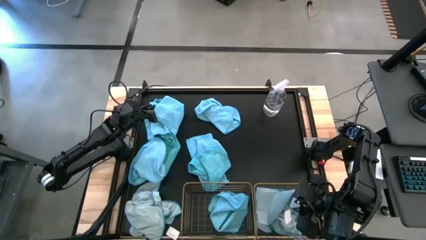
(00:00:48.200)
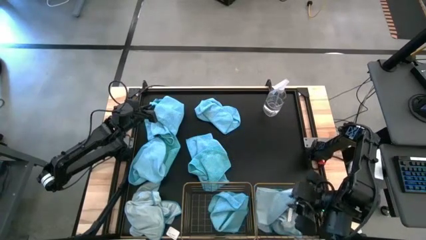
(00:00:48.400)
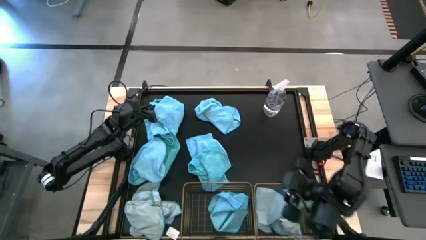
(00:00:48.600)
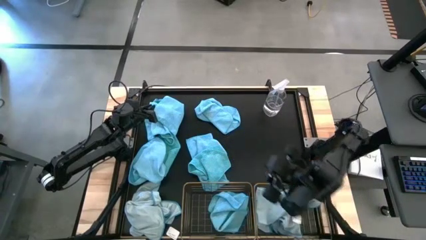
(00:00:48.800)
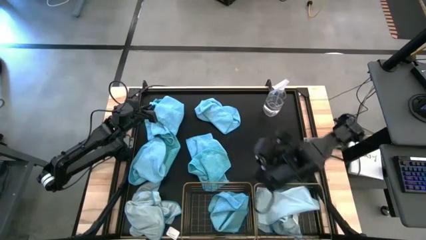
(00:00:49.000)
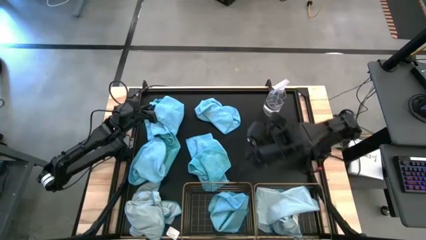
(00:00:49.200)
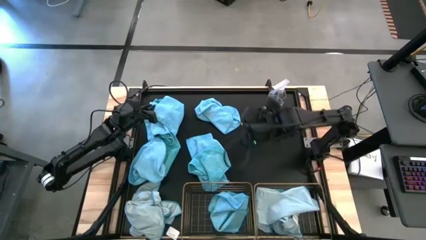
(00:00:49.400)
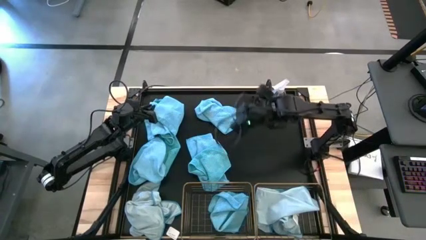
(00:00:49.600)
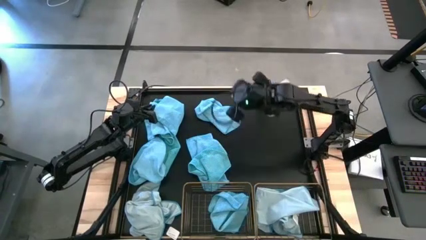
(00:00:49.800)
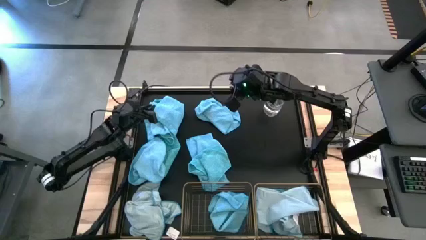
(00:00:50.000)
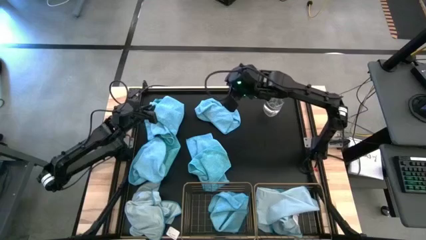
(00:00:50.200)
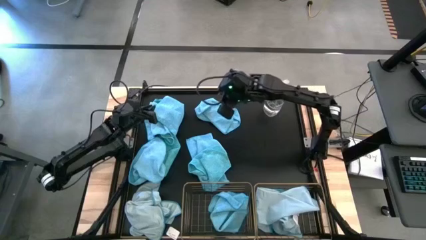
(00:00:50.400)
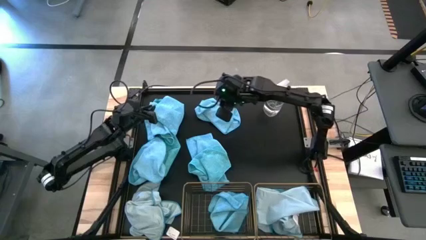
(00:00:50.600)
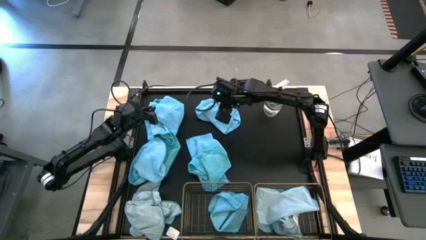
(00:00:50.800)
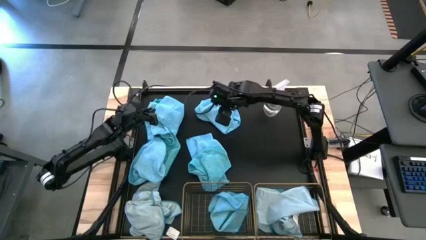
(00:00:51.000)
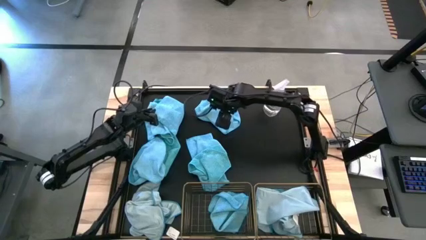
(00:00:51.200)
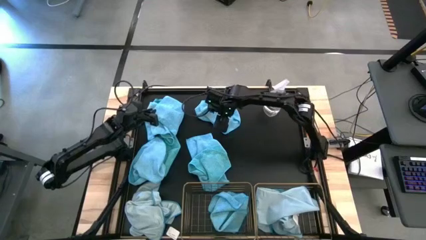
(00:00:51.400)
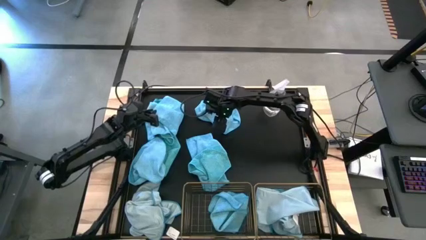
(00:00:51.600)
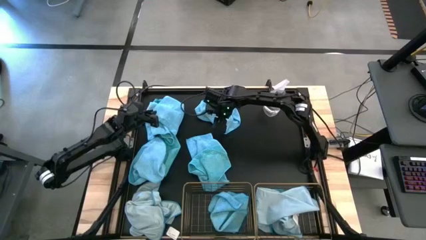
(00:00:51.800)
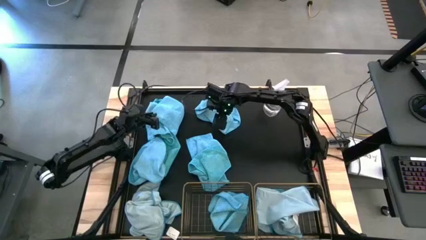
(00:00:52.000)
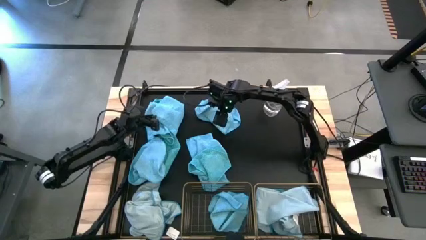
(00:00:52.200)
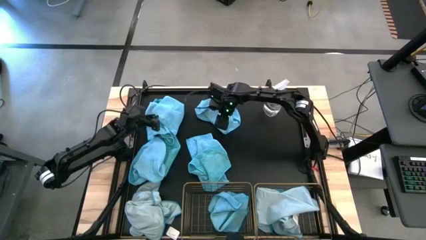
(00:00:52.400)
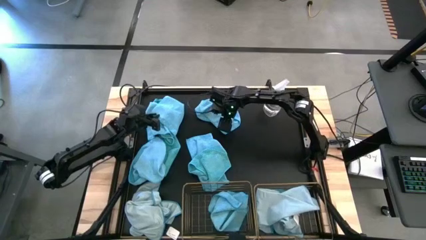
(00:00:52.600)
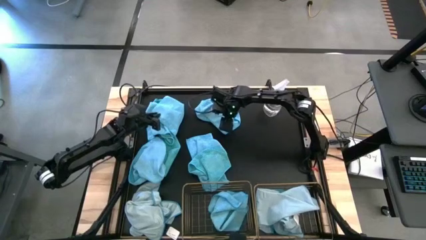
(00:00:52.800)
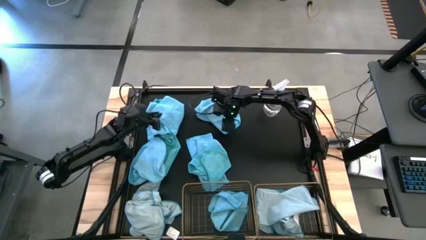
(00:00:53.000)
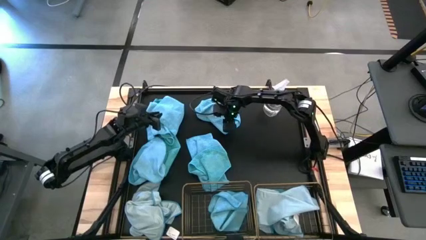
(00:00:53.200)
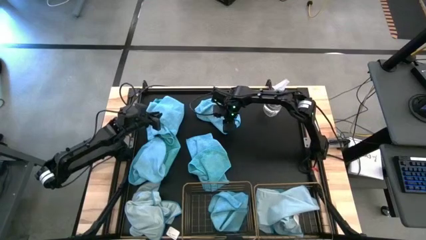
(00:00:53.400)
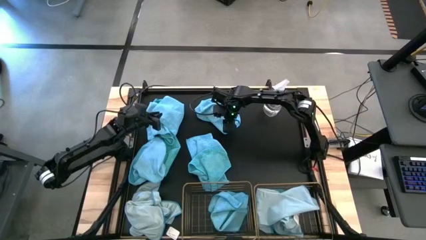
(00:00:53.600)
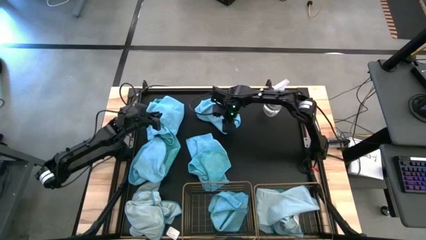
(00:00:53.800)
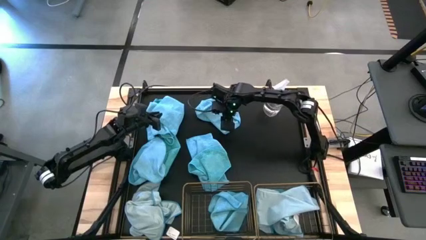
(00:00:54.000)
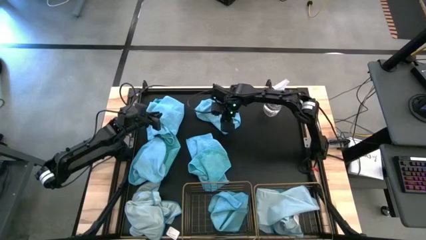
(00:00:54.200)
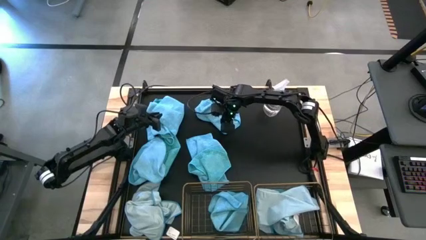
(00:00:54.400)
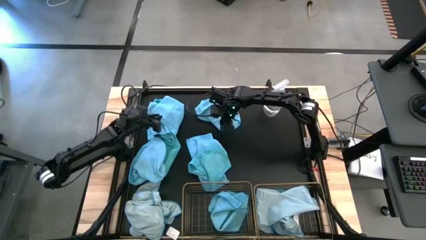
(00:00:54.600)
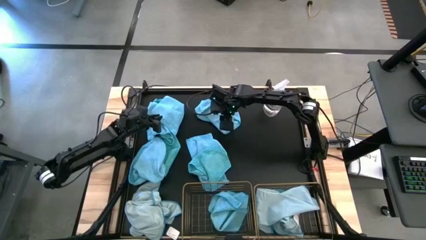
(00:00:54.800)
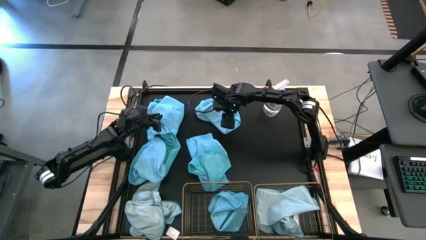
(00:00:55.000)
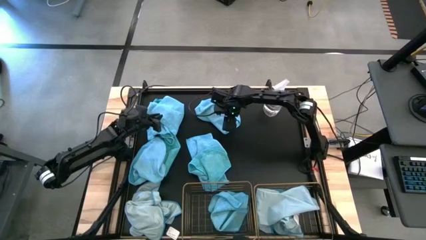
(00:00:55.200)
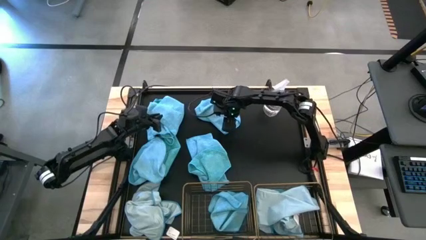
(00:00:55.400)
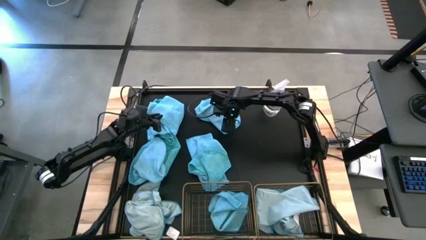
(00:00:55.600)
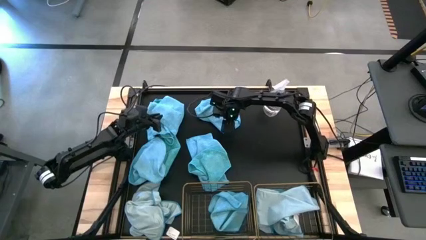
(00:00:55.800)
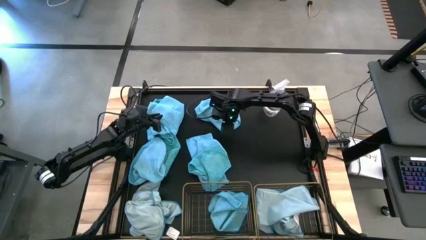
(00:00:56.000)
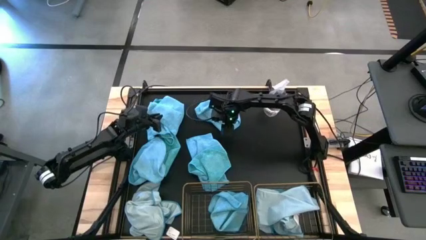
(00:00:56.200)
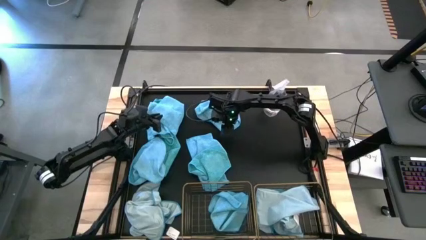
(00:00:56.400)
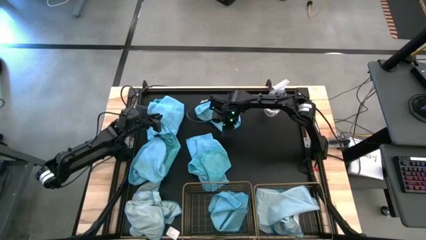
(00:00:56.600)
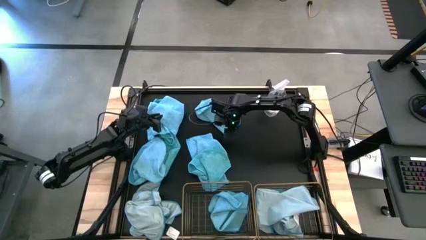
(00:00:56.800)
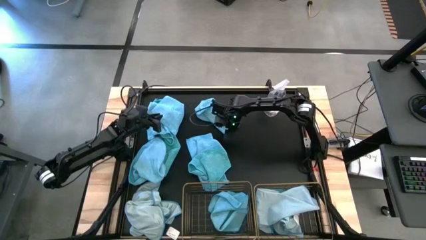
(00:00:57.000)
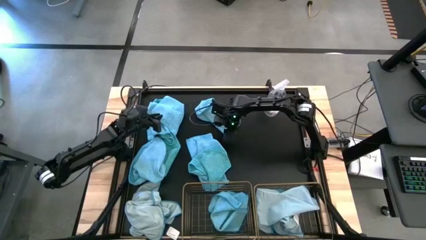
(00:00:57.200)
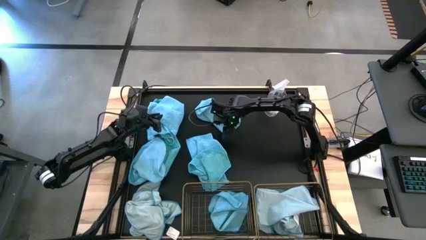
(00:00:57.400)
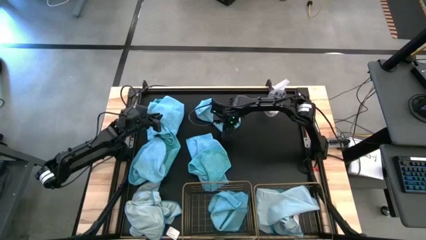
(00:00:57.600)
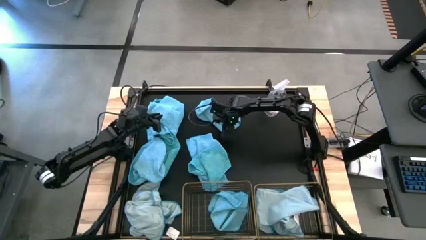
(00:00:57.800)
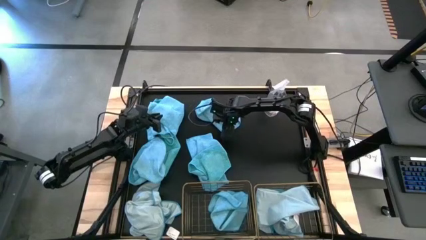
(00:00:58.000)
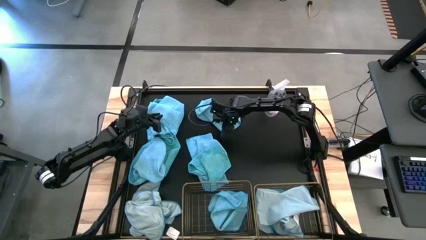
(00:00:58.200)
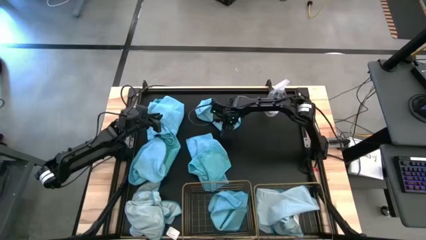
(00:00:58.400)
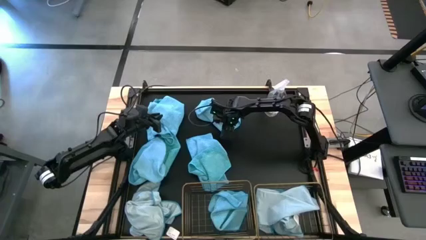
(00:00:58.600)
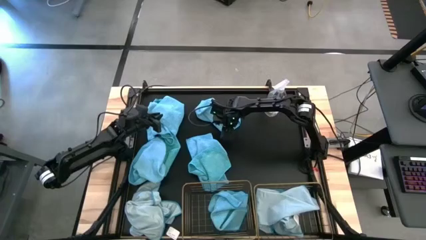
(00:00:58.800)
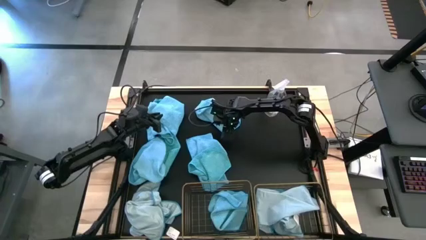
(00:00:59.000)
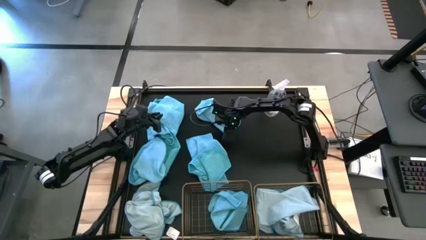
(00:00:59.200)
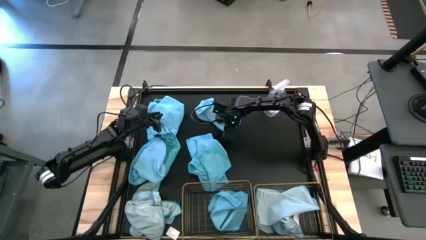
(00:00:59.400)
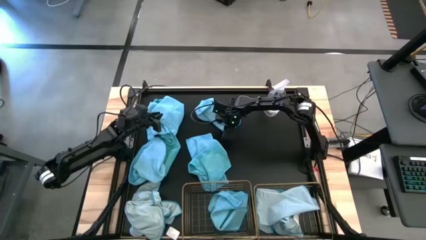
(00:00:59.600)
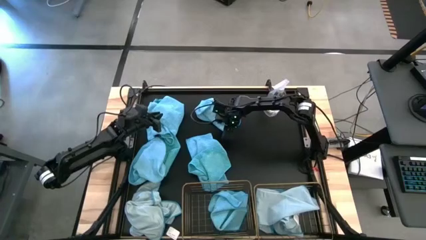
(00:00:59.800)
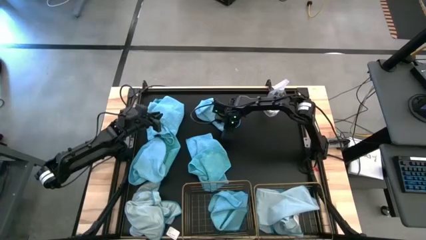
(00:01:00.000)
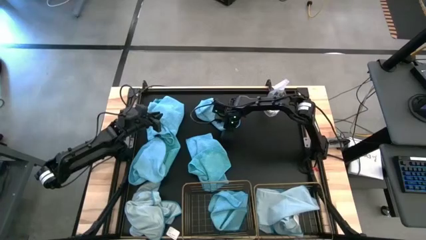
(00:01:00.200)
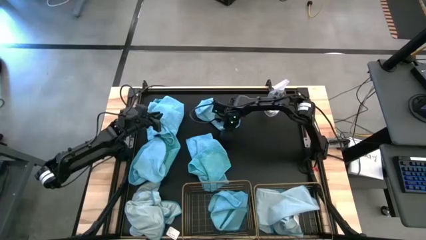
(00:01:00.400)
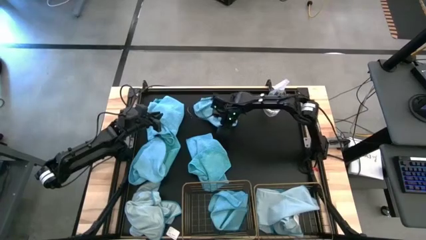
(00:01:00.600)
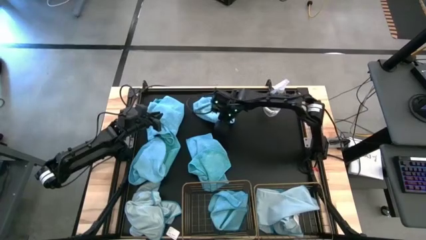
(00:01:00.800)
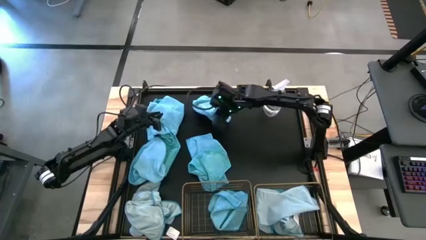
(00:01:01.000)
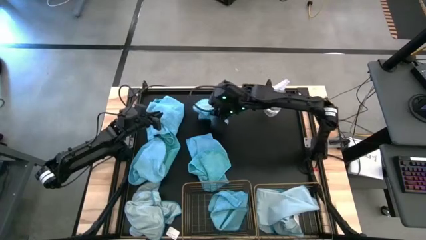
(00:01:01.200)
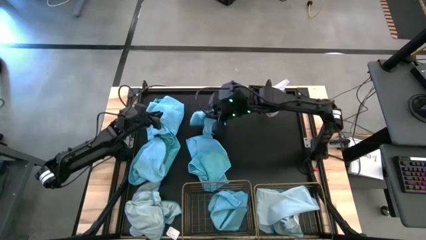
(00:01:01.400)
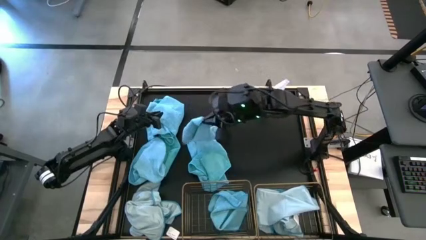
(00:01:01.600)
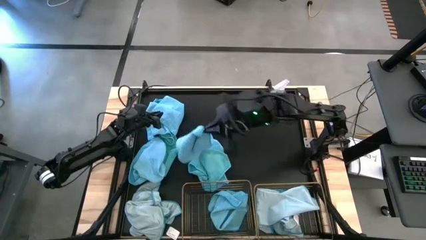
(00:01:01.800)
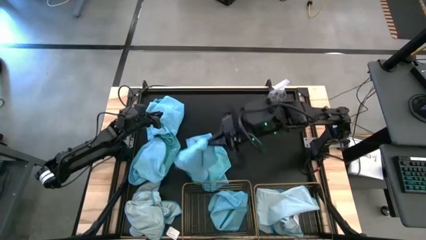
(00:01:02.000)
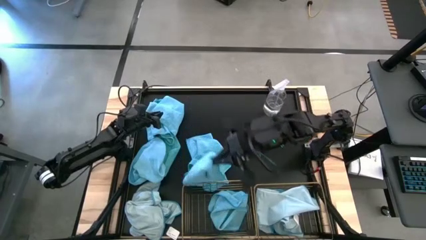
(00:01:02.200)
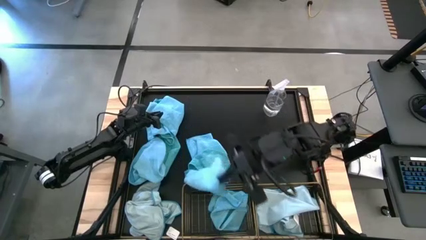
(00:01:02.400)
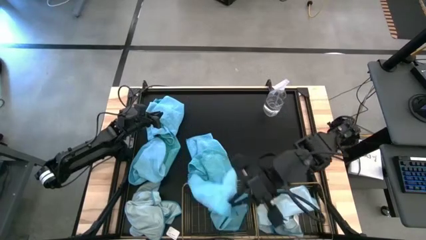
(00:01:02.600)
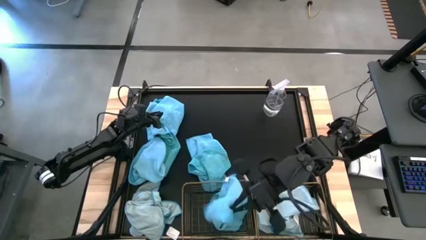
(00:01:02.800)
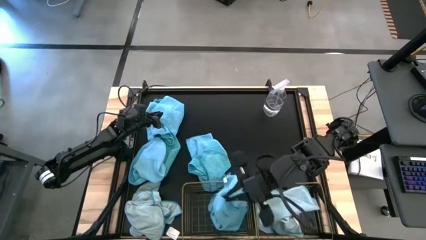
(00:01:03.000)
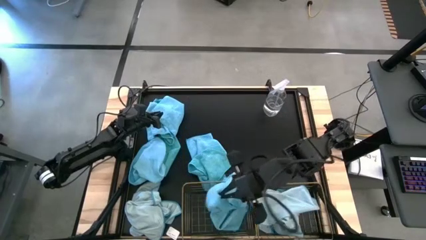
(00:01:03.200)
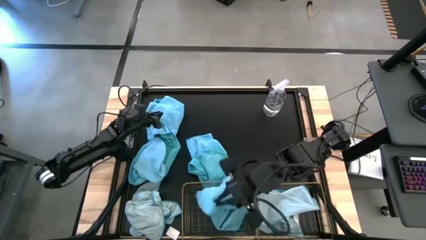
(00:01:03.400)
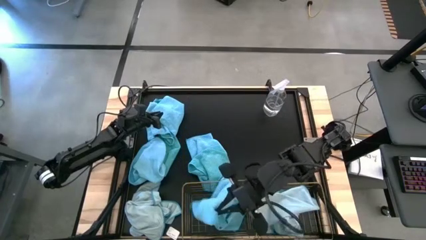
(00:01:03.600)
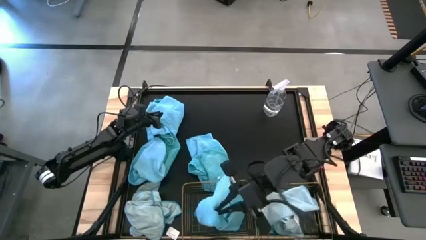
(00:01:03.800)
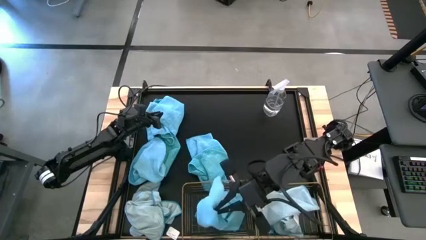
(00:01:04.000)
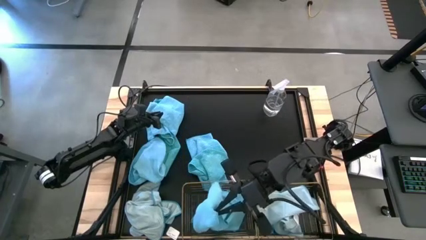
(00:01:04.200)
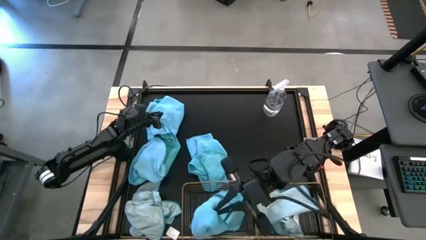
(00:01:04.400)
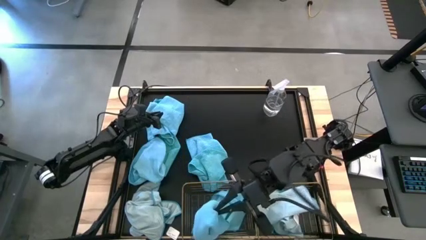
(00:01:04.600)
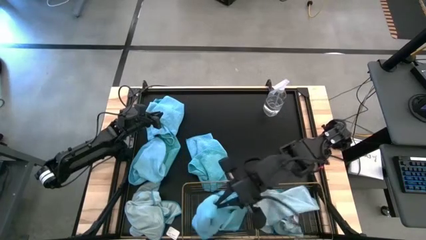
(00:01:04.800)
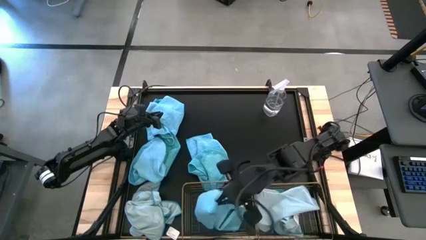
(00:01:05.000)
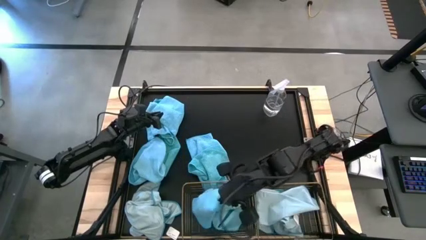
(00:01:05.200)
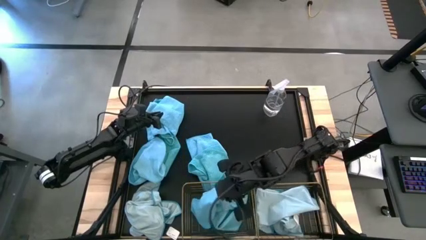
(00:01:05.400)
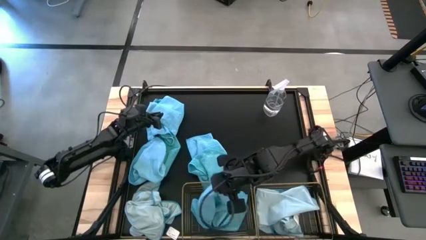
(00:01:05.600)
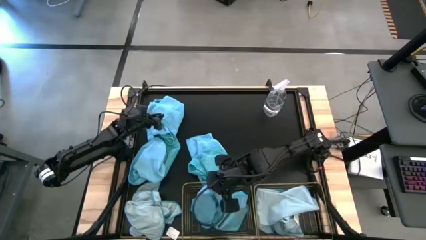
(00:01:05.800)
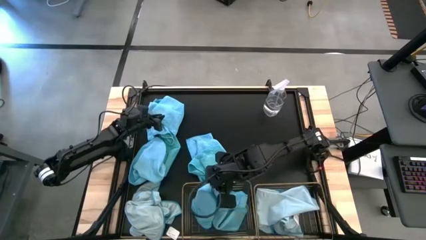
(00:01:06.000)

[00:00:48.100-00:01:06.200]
Task: Sort microfiber towel by color & place in baskets
Put the blue towel into the left wire basket
